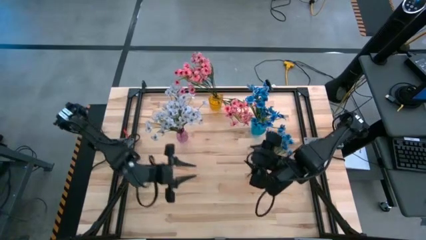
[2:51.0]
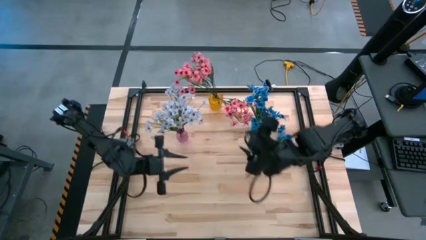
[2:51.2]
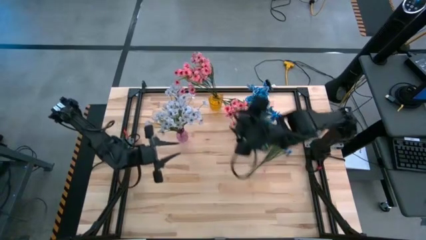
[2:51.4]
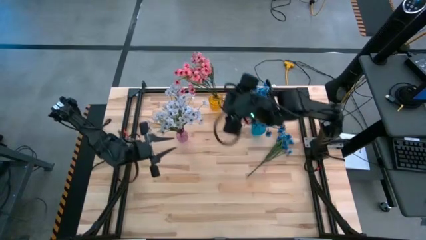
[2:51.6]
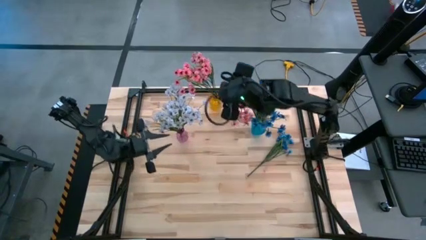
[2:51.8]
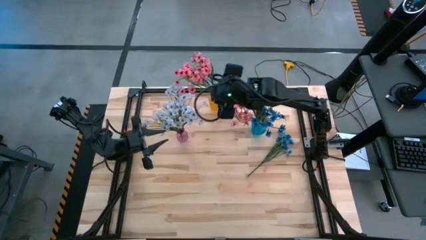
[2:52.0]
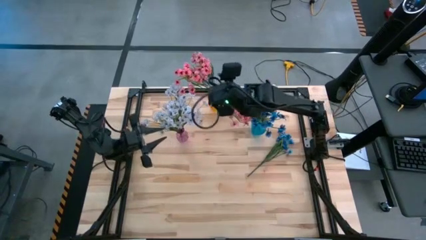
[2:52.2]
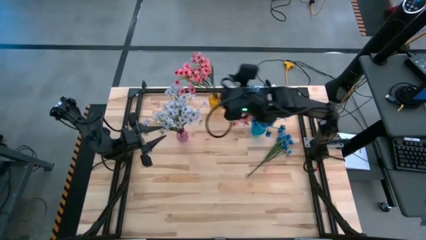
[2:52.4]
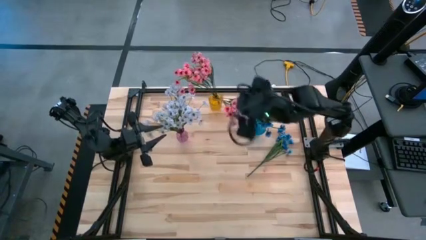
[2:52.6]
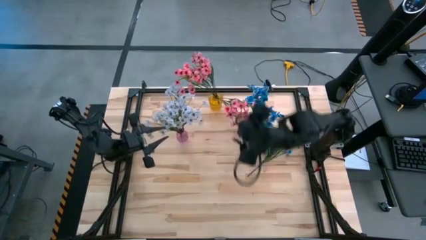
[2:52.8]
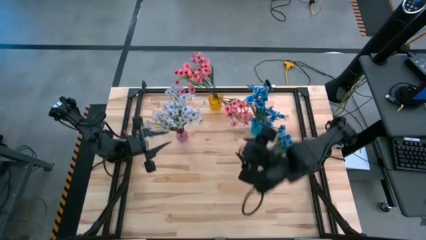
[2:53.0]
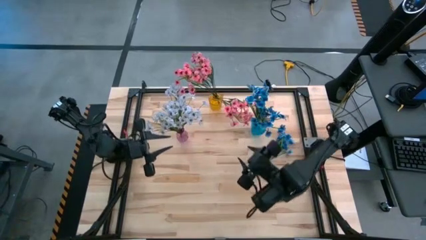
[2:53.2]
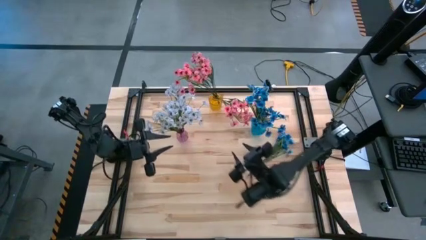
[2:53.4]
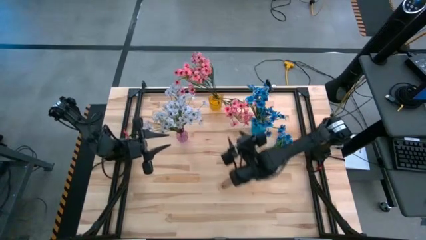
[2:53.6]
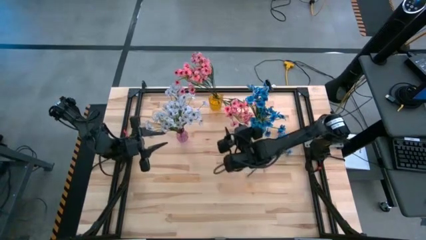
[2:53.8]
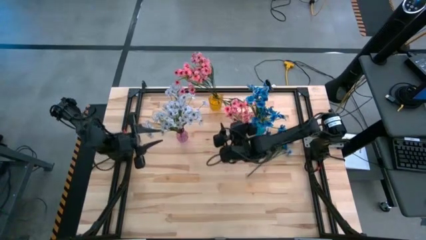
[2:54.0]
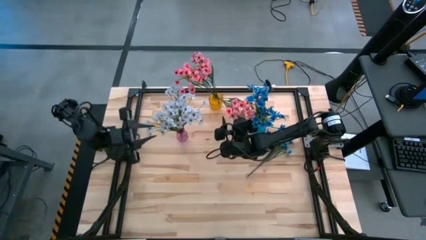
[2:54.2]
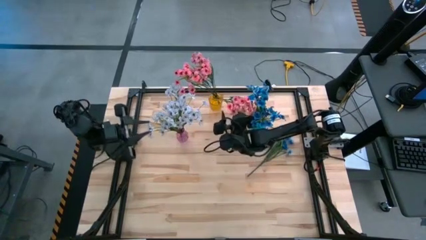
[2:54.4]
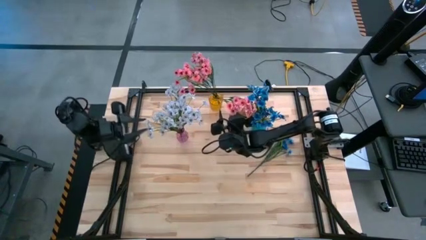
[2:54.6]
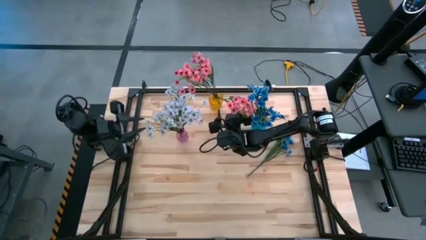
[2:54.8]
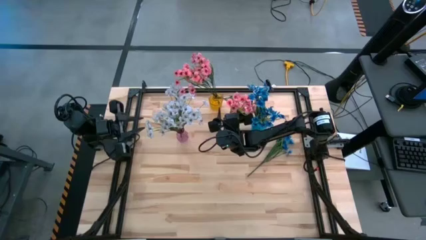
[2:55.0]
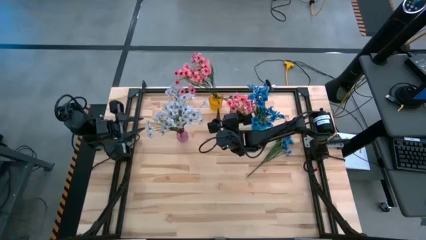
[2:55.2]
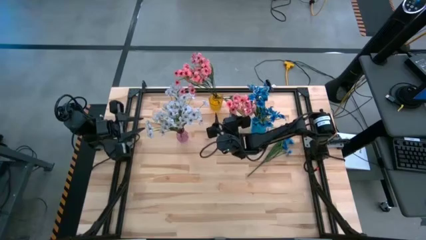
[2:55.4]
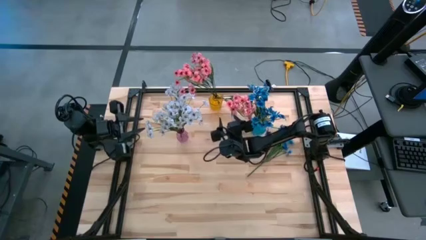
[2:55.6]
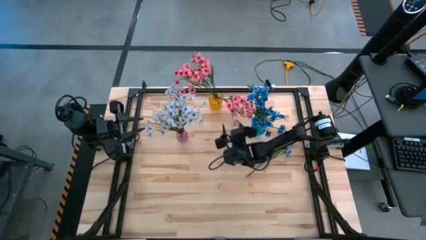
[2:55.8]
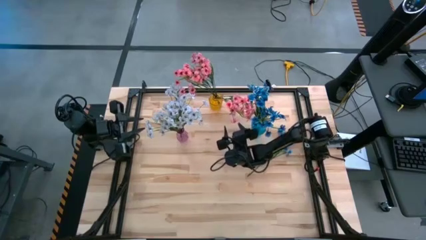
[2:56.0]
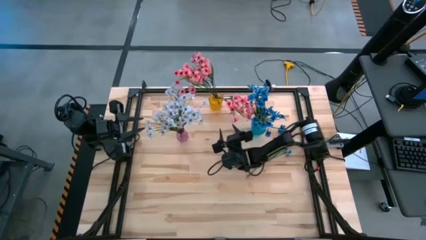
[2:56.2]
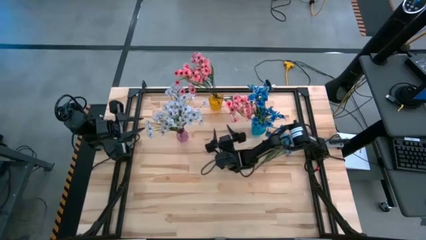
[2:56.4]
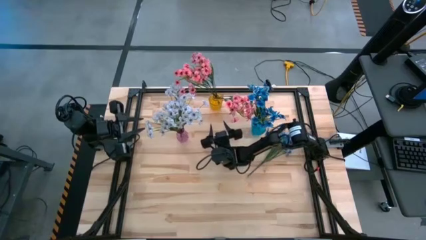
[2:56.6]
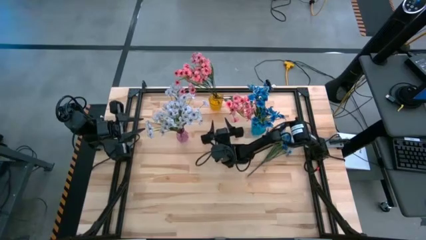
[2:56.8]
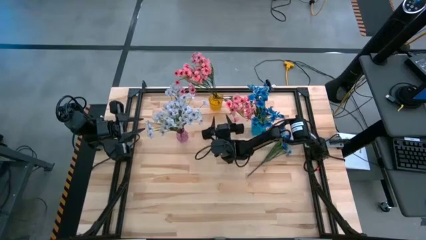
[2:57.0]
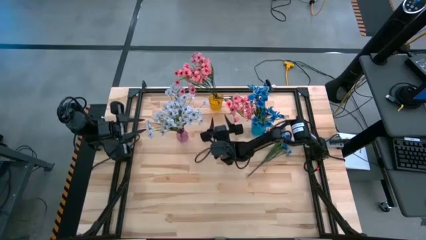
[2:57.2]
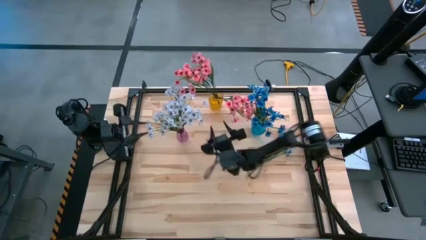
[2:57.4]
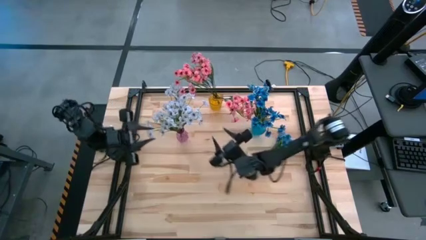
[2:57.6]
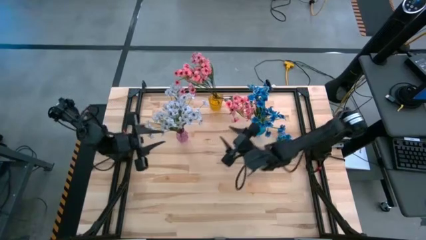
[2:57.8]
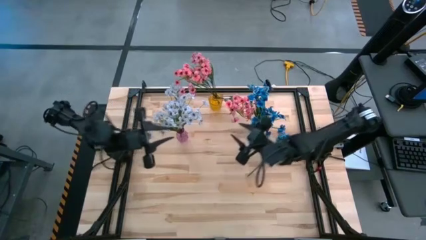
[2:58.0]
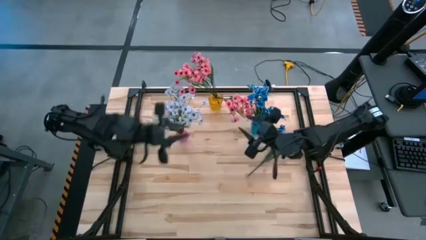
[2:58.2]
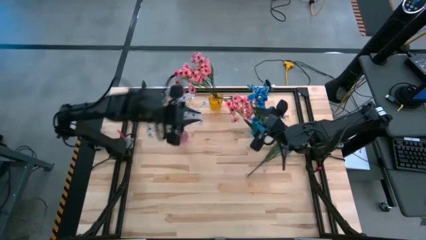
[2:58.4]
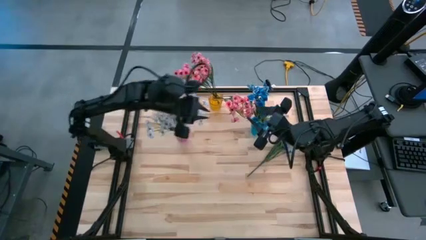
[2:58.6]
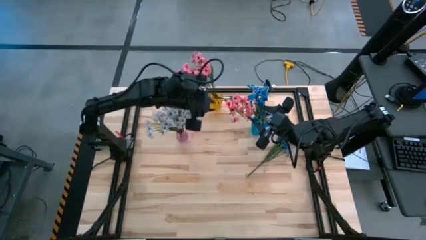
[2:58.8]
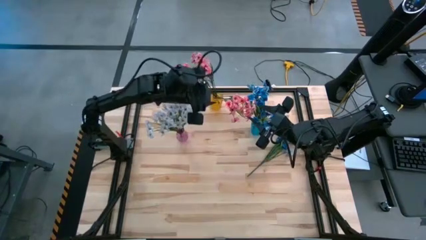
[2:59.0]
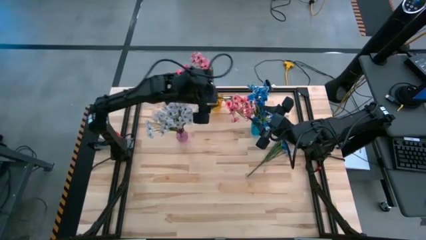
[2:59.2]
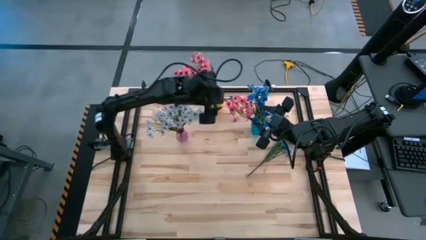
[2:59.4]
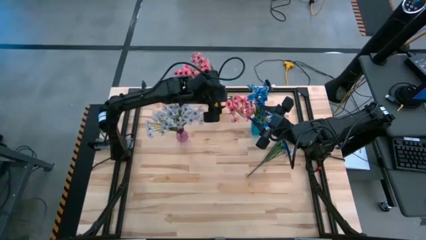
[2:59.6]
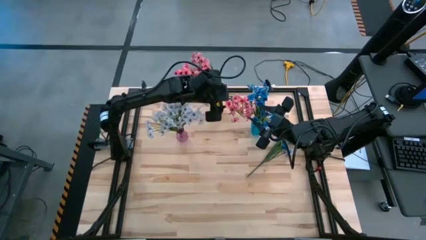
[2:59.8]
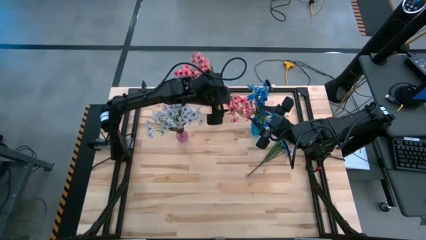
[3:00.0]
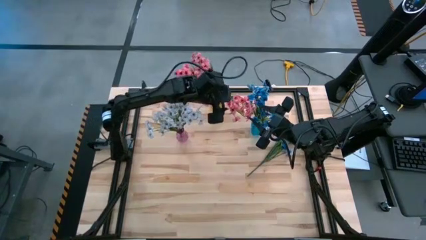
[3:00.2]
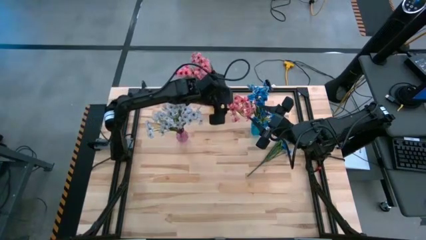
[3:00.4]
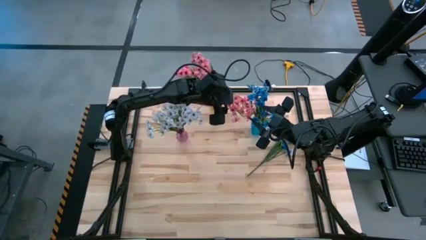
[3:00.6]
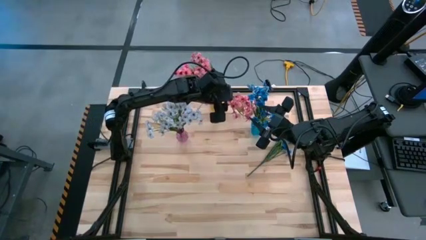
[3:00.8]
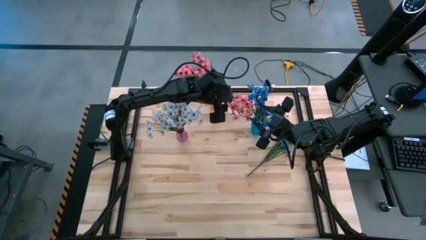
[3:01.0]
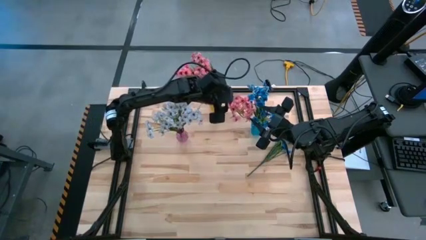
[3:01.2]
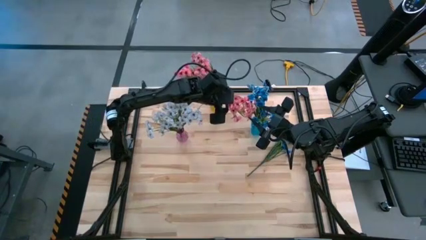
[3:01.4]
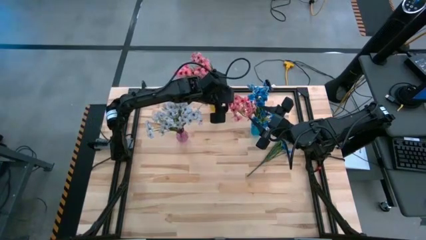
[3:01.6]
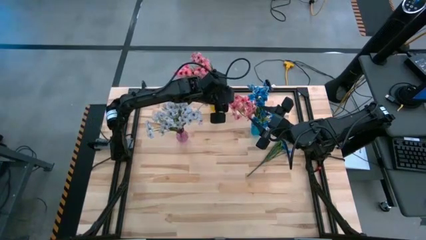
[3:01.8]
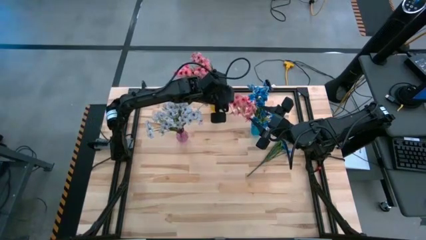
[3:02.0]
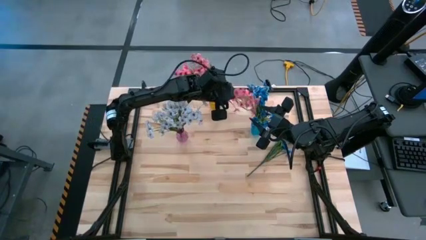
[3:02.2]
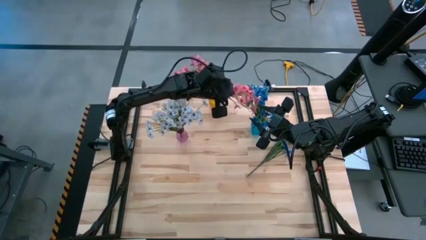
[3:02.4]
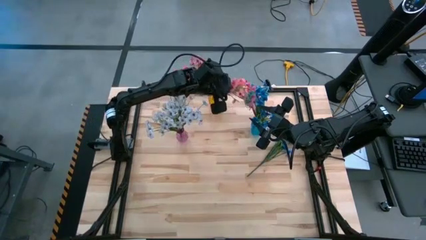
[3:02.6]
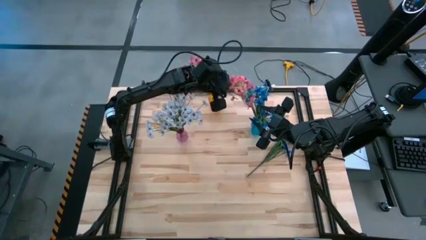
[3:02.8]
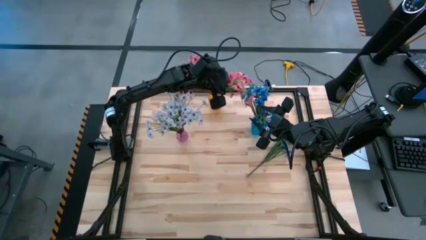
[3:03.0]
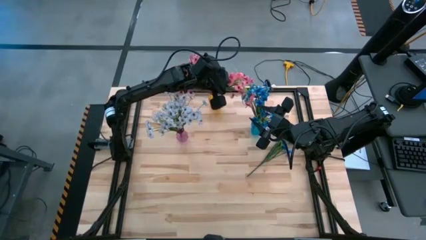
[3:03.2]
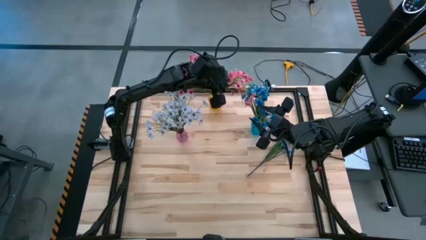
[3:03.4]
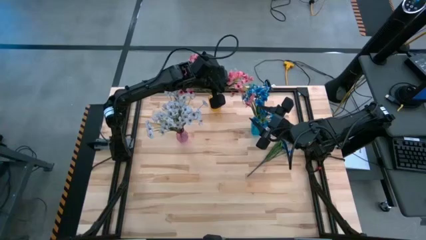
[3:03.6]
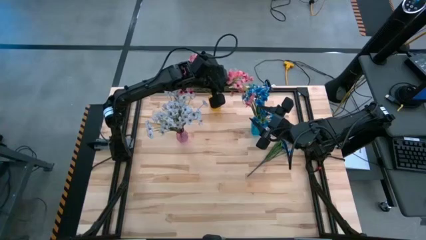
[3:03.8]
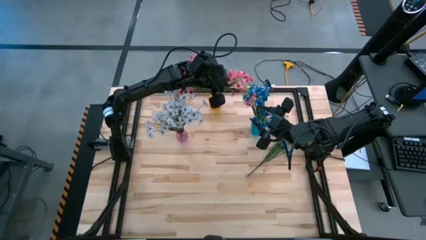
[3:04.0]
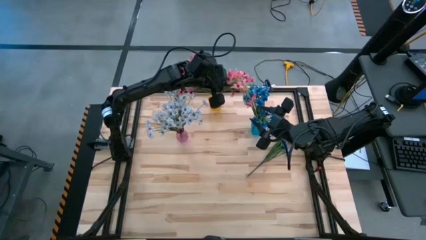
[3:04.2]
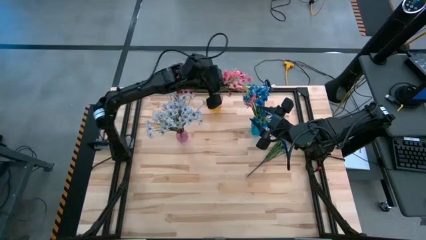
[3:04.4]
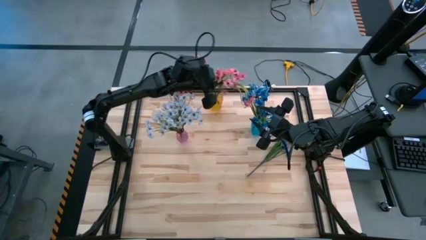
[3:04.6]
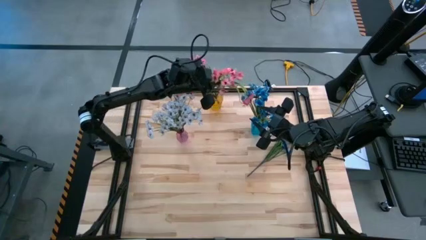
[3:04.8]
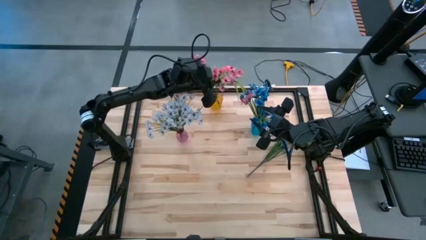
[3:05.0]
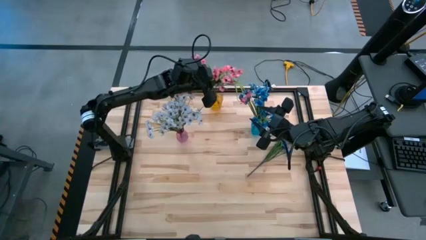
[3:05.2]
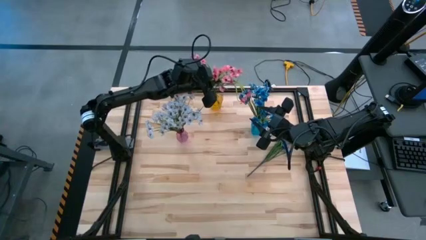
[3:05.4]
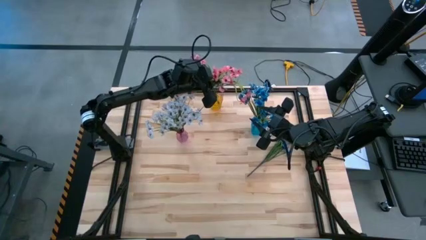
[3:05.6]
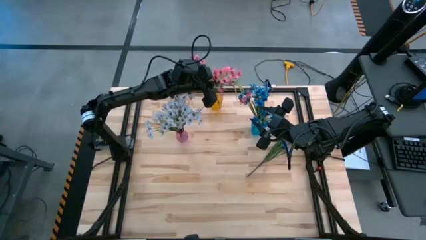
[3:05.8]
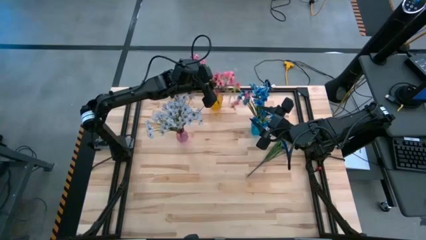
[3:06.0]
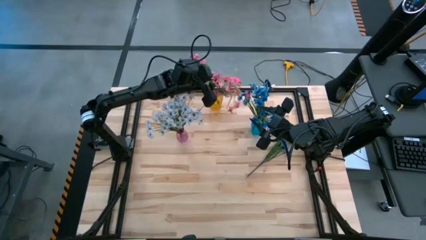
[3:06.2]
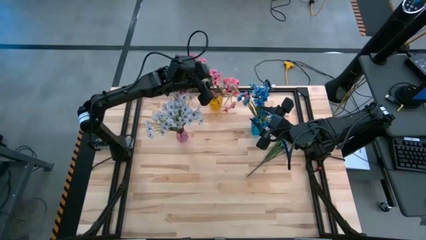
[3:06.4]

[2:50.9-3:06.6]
Task: Sort flowers into vase by color
Put the pink flowers into the yellow vase
